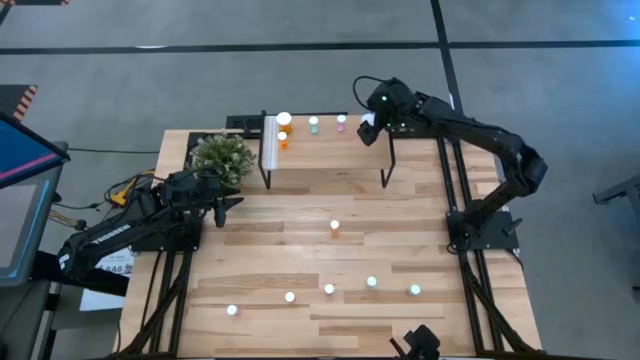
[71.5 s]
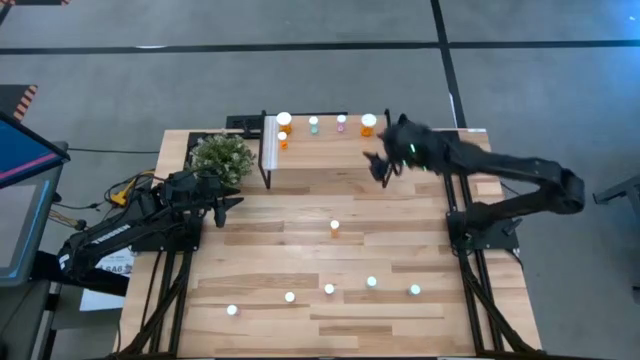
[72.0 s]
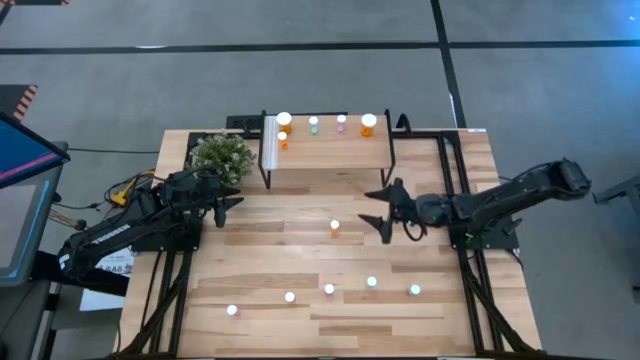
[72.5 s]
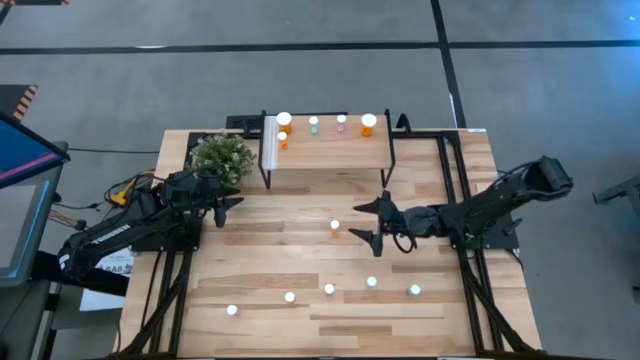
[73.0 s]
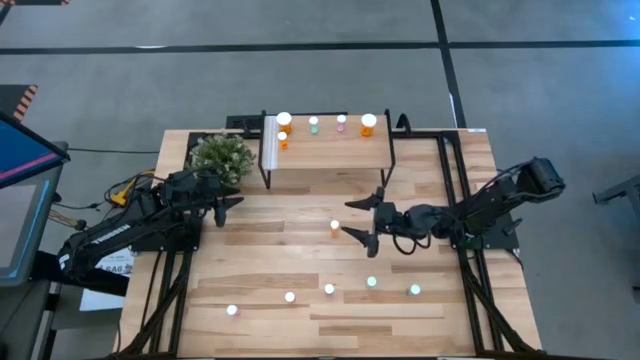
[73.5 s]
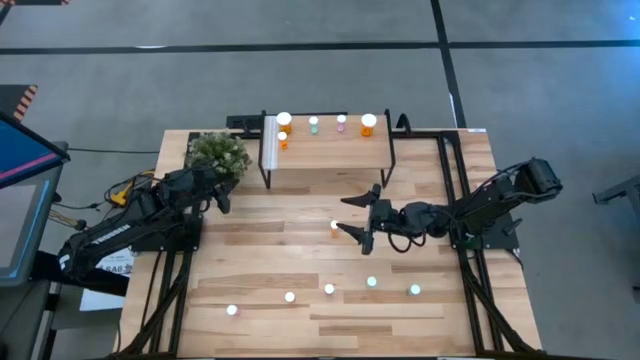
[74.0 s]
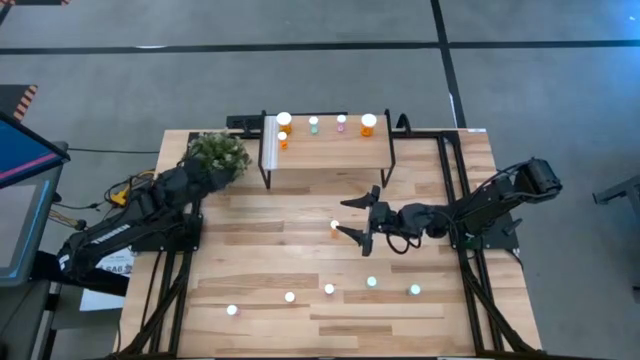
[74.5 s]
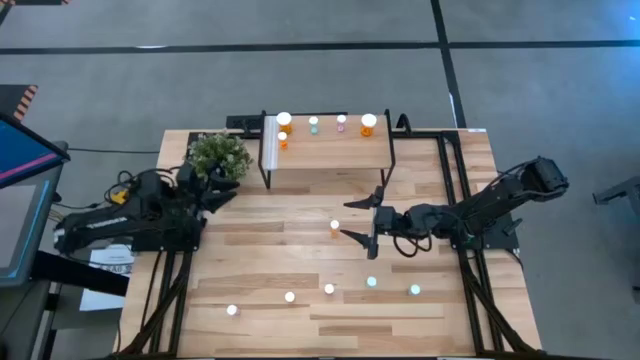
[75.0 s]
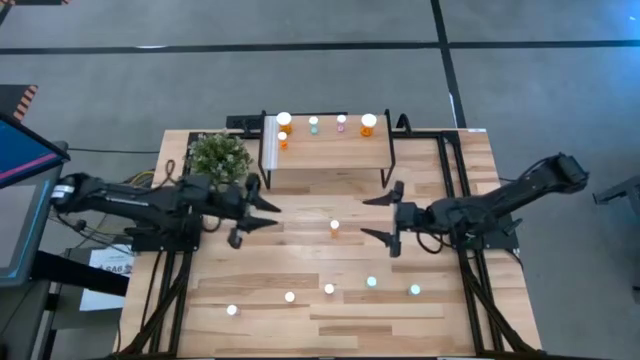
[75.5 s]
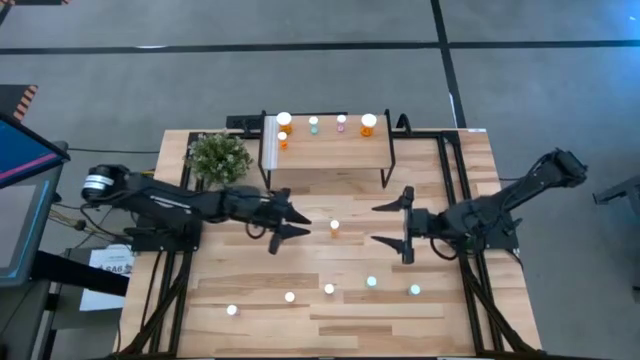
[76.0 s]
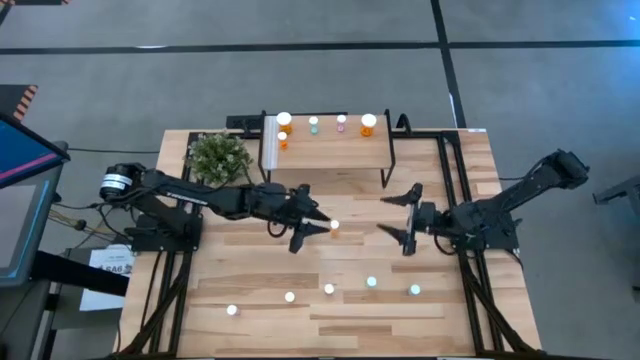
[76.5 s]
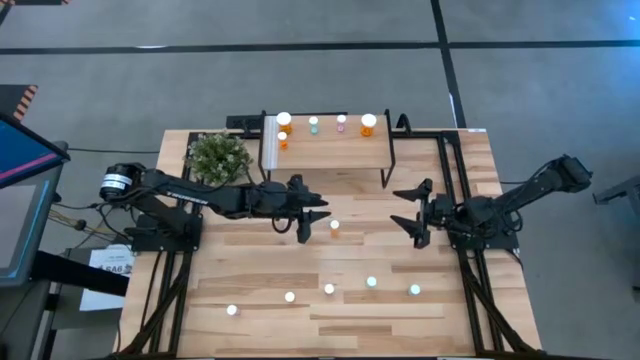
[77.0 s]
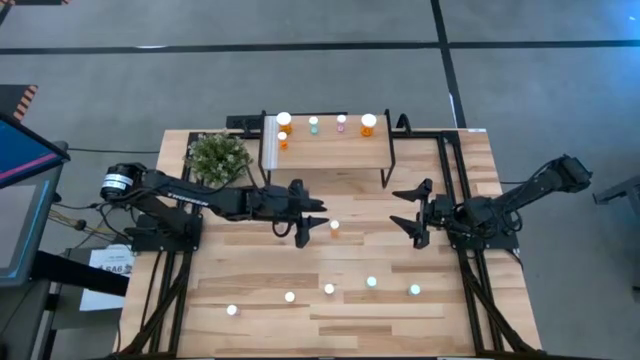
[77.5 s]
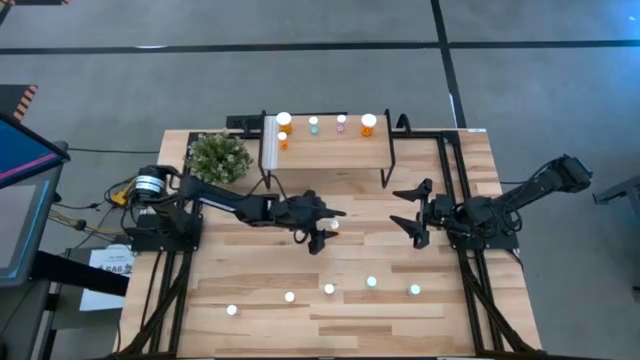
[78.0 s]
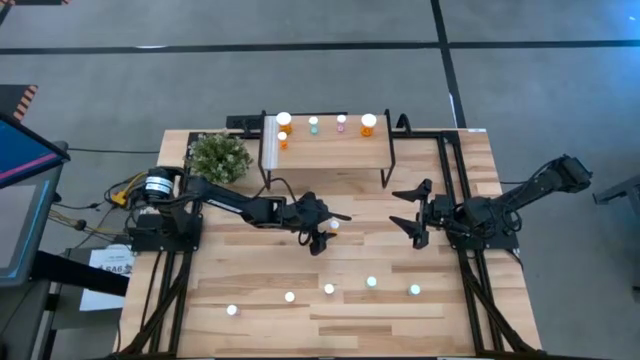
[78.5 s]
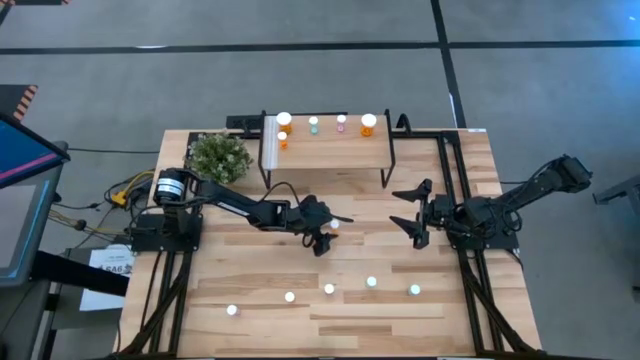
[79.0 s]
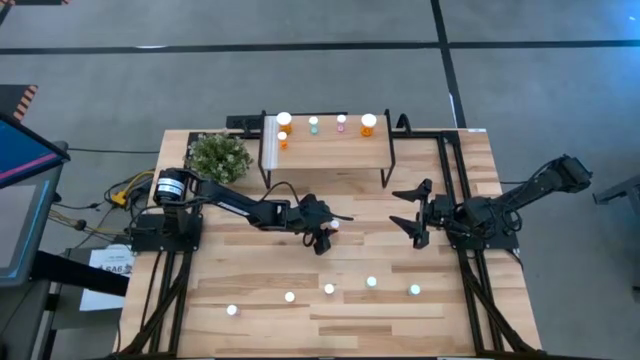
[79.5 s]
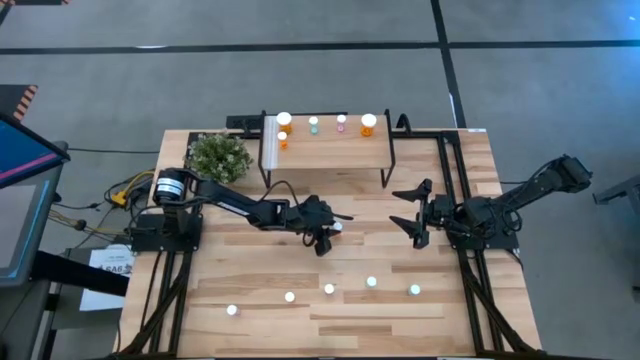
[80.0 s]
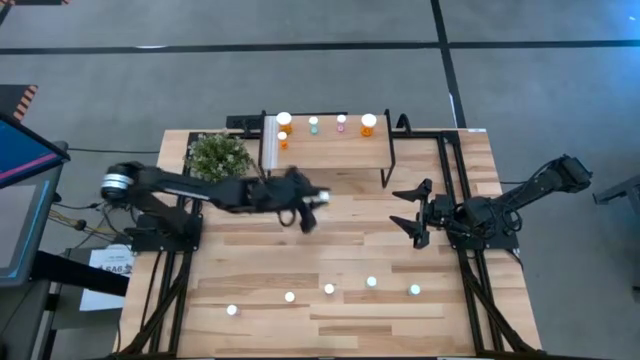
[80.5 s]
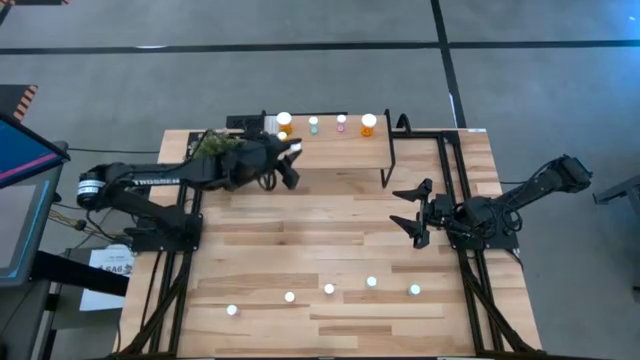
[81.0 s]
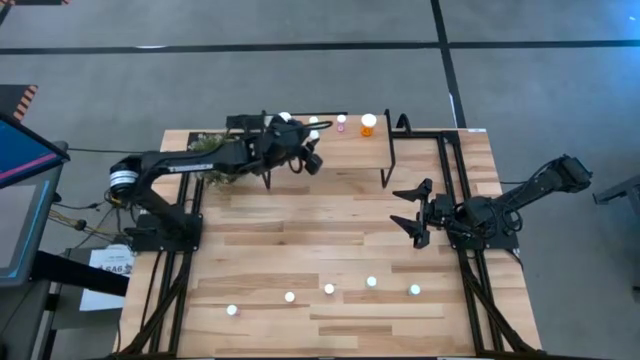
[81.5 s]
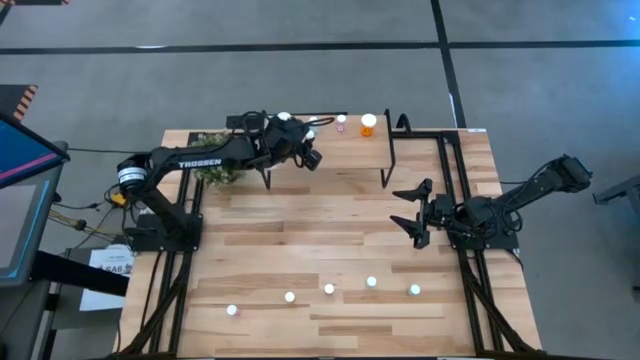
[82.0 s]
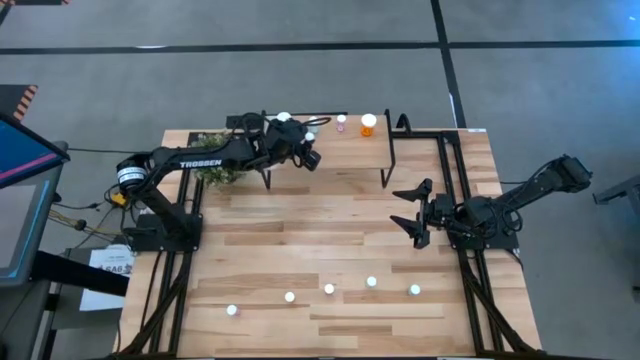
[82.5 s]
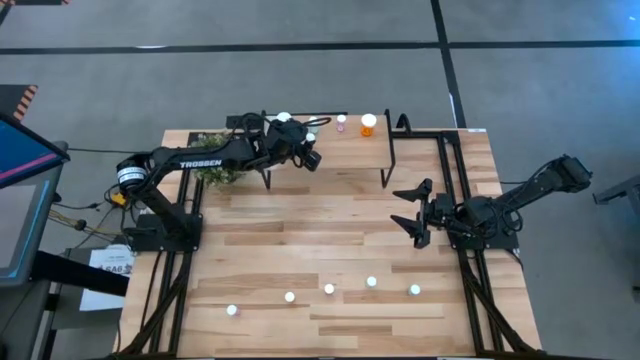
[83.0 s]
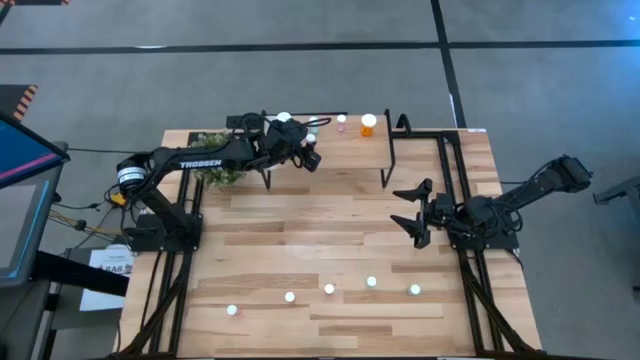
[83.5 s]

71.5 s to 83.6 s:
Task: Pick and place medicine bottles onto shelf by color
Put the small top orange pill bottle on the shelf

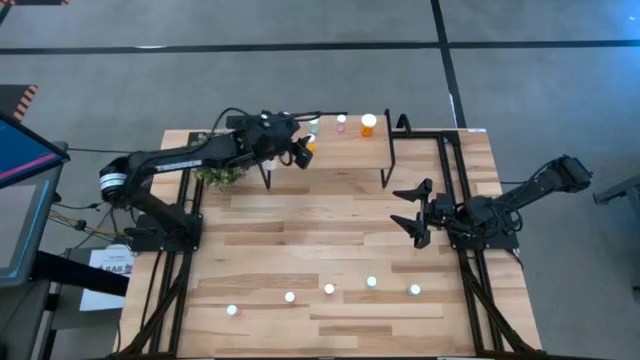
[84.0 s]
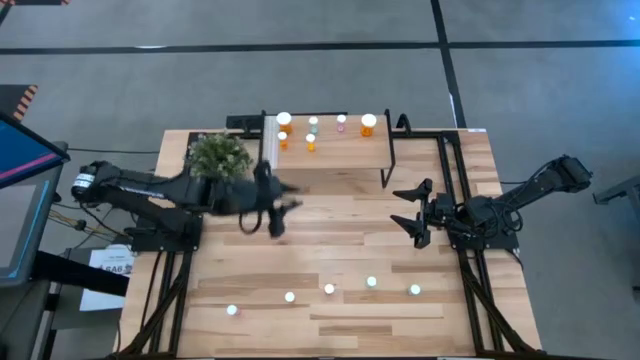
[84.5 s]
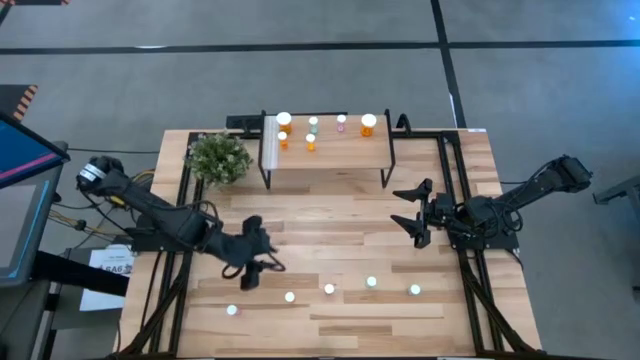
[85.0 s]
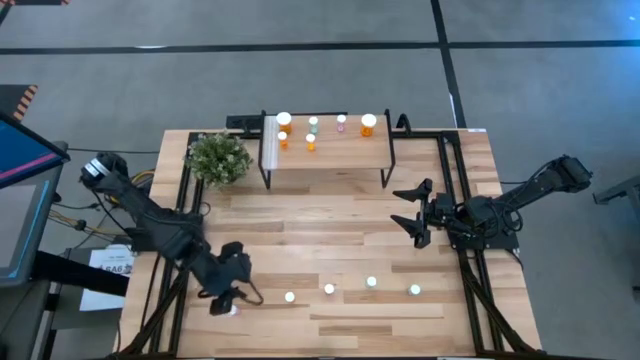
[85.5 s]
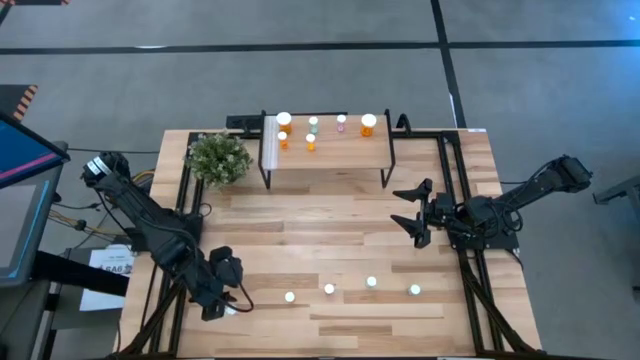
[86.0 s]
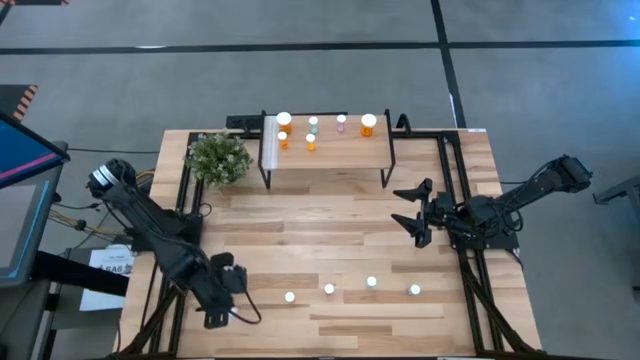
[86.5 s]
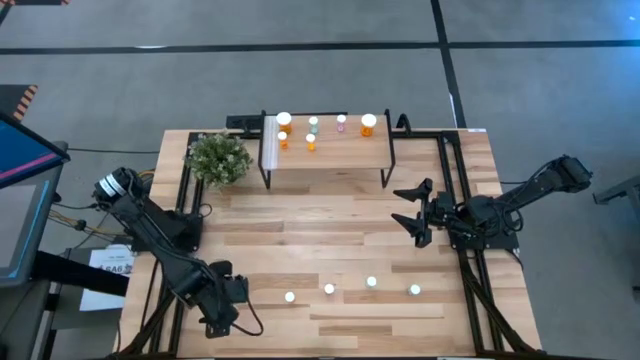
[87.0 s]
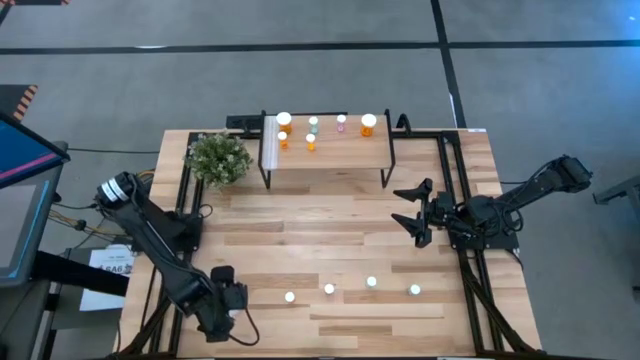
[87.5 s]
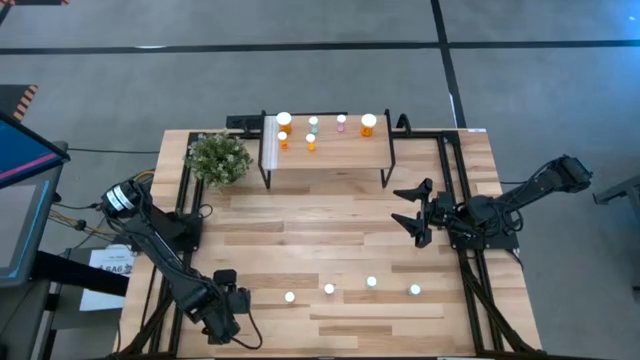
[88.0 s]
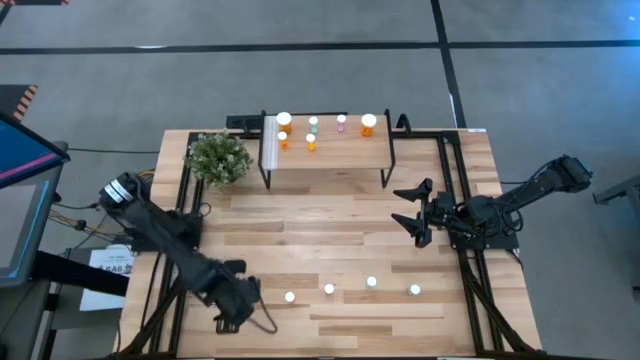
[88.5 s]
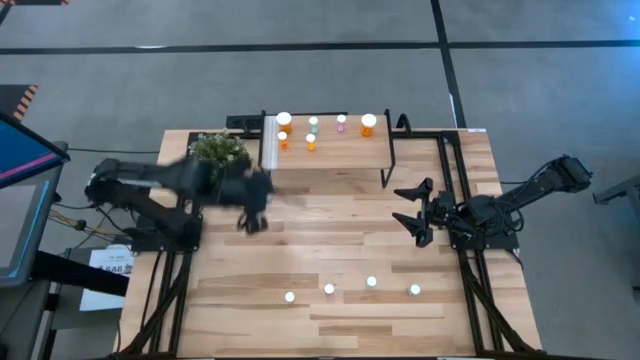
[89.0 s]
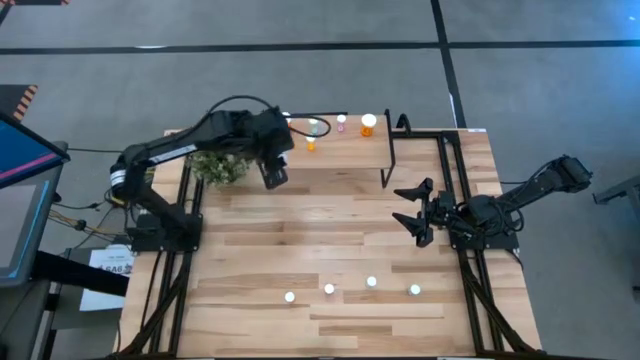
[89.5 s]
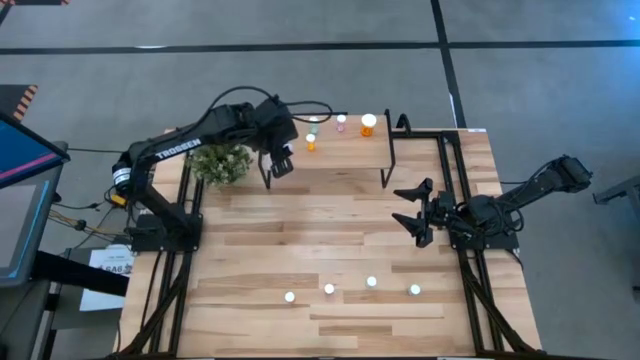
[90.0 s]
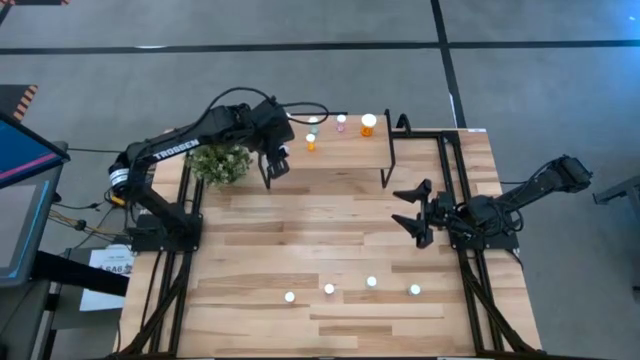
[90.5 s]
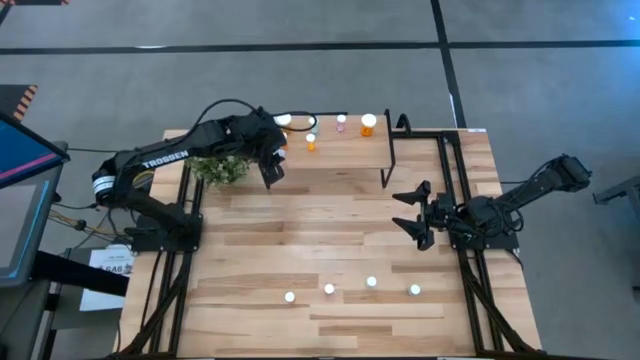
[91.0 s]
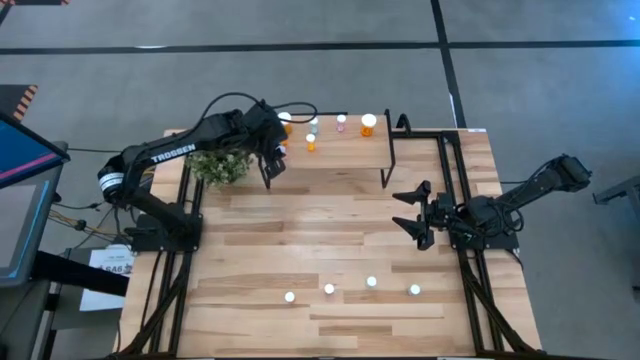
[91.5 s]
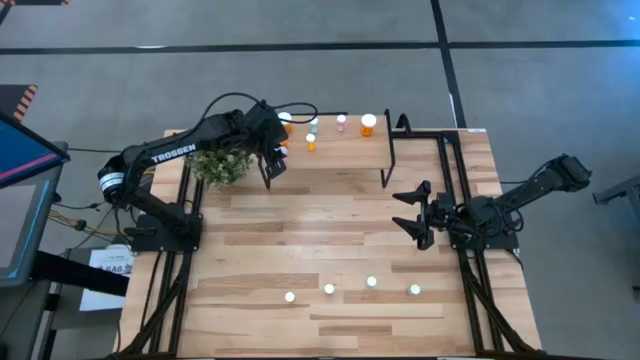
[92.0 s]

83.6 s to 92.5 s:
Put the small left pink pill bottle on the shelf

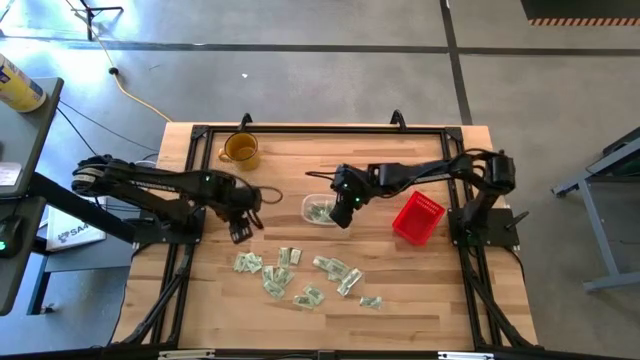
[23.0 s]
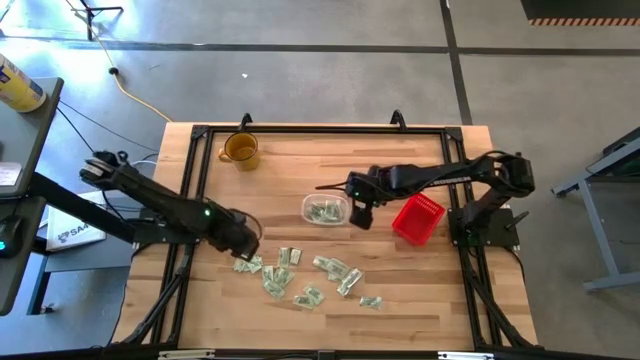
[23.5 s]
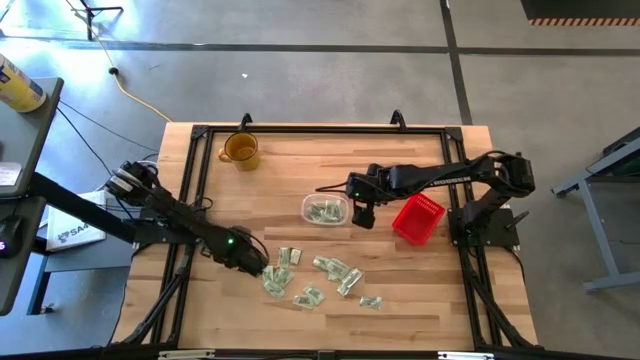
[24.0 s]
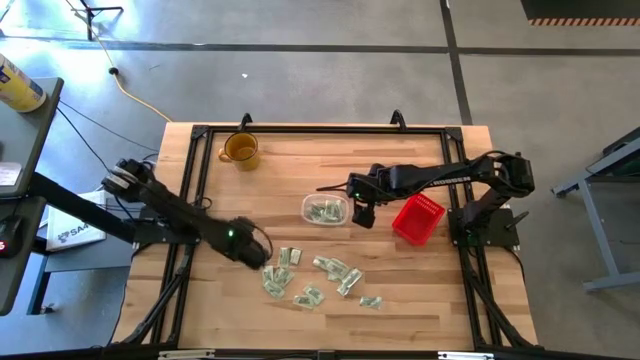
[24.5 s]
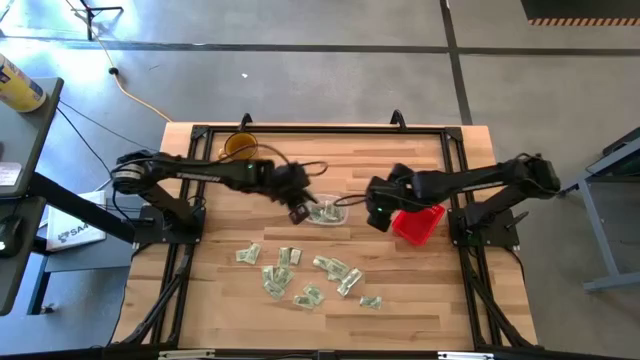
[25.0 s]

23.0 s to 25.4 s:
Task: Pick and place items into bin
Put the white stevia packet into the transparent bin
